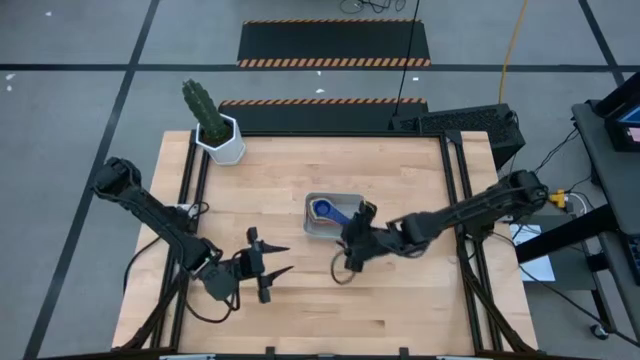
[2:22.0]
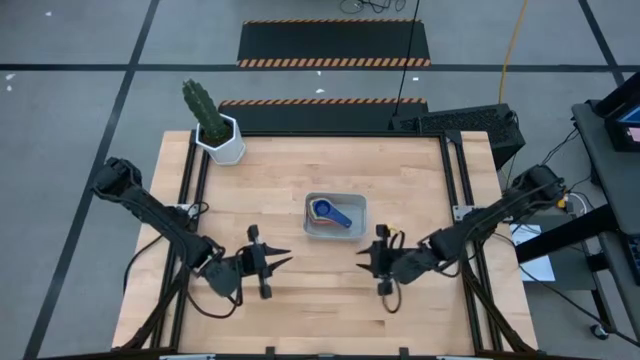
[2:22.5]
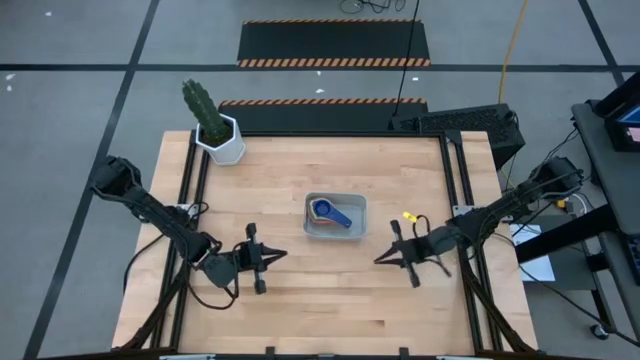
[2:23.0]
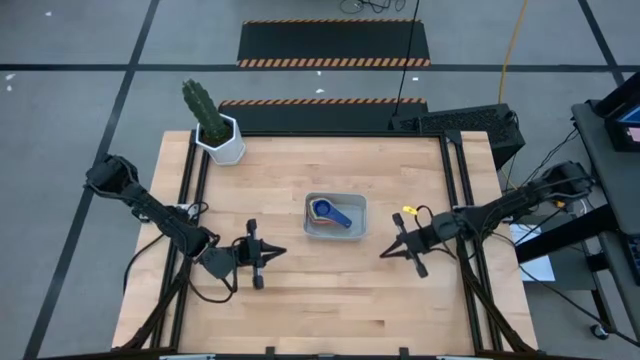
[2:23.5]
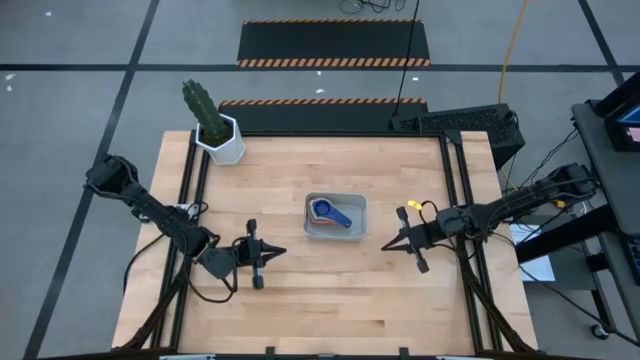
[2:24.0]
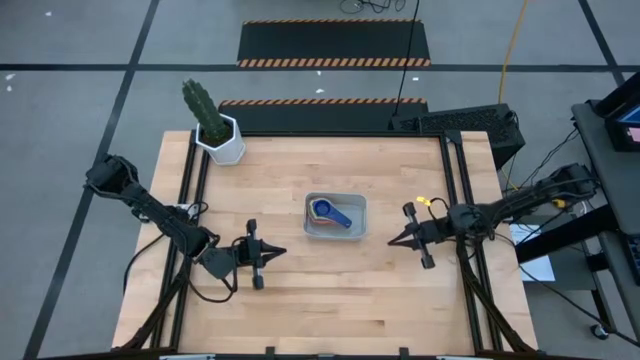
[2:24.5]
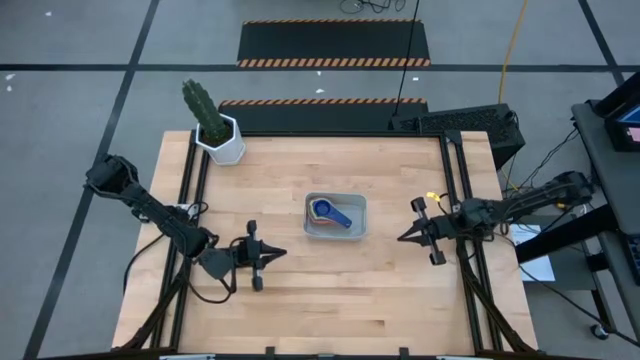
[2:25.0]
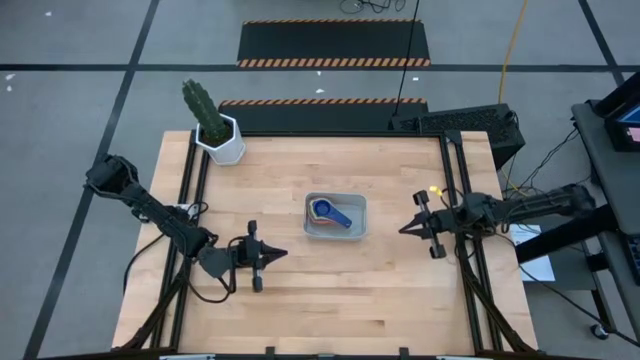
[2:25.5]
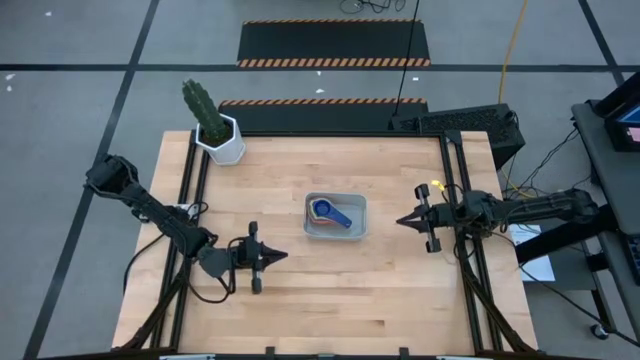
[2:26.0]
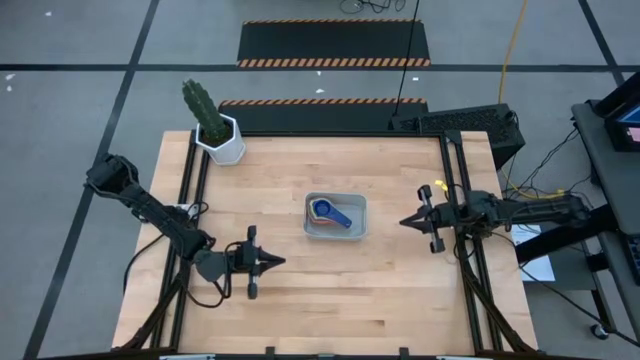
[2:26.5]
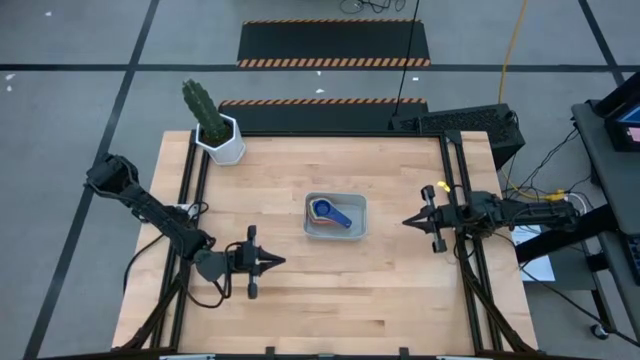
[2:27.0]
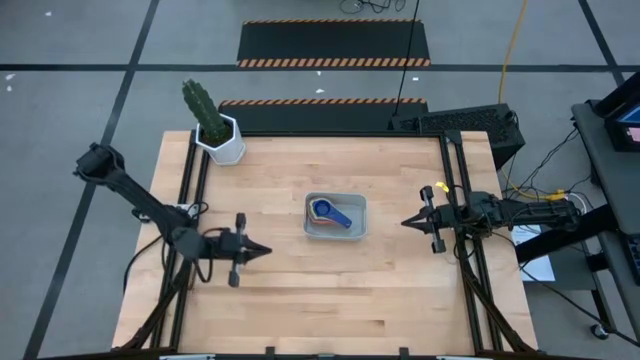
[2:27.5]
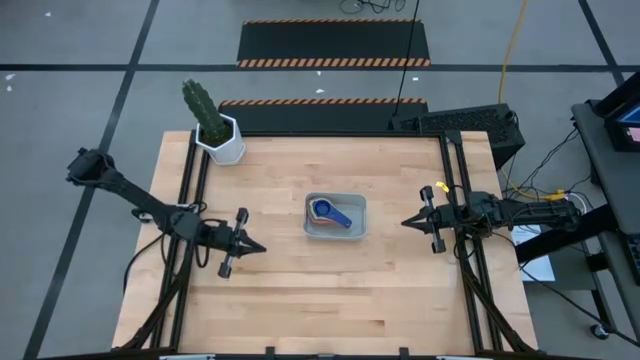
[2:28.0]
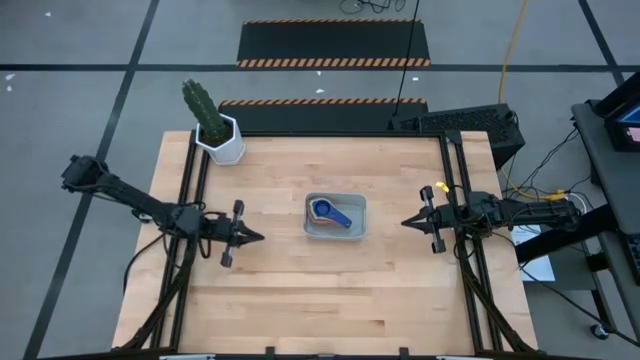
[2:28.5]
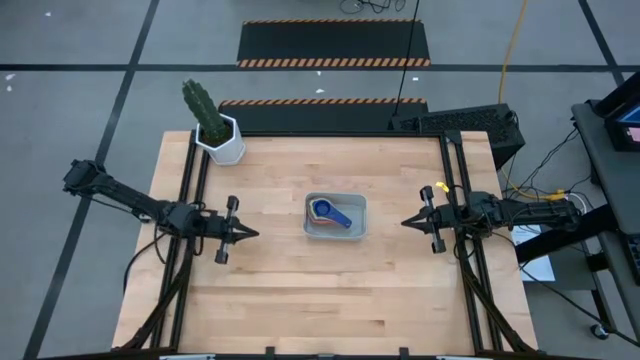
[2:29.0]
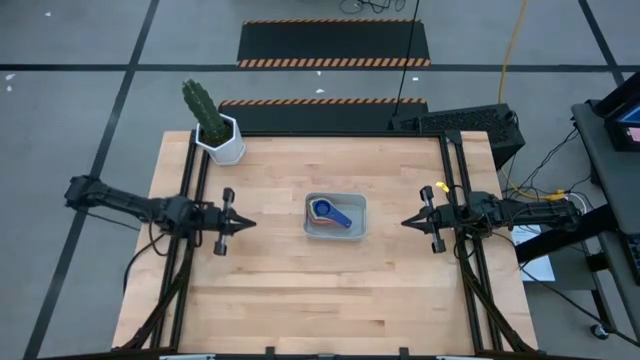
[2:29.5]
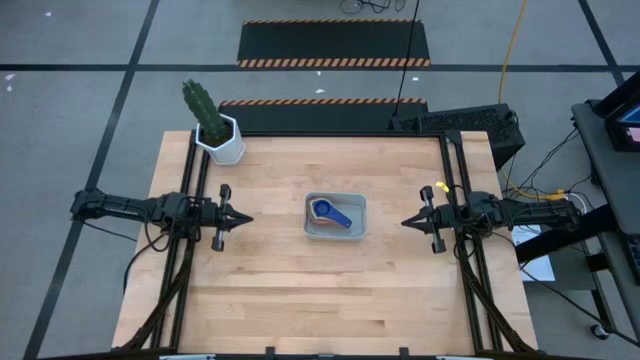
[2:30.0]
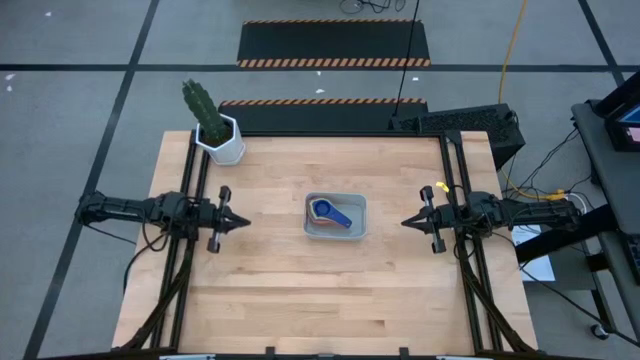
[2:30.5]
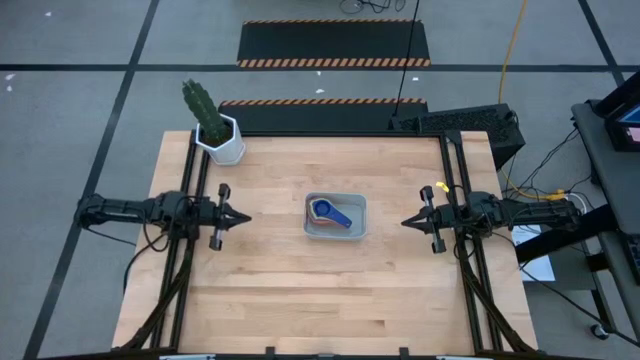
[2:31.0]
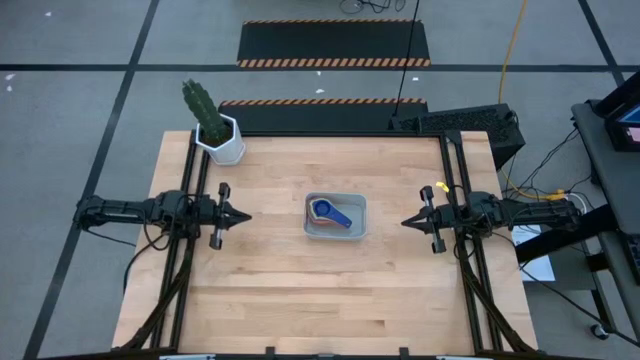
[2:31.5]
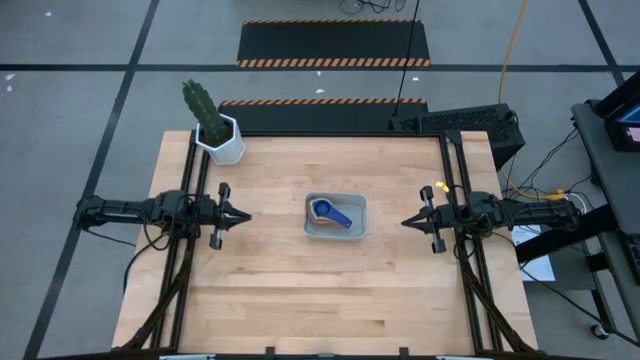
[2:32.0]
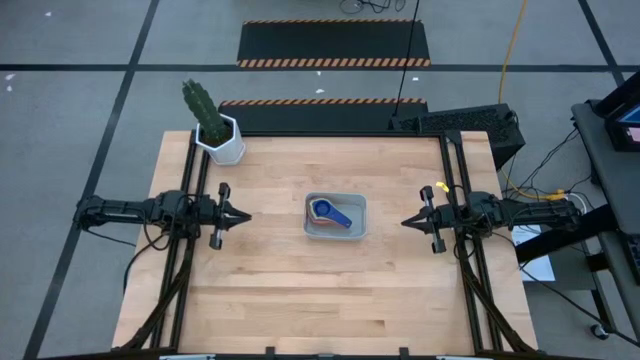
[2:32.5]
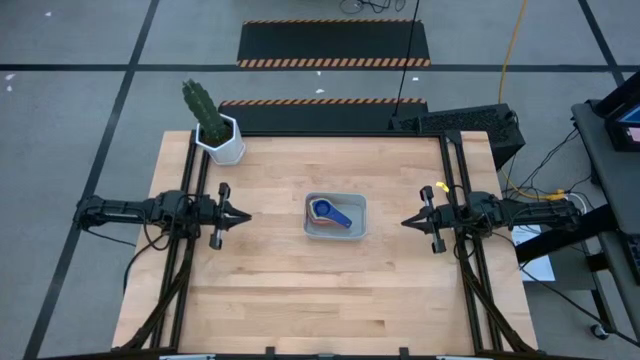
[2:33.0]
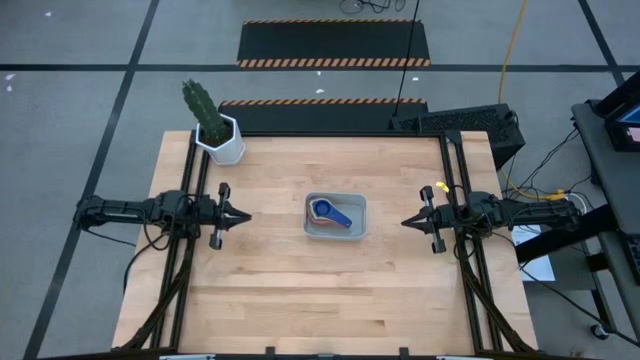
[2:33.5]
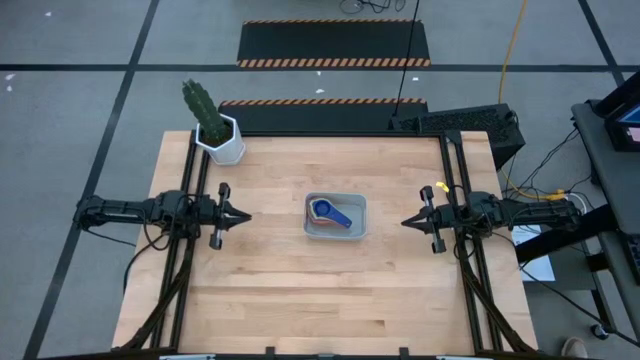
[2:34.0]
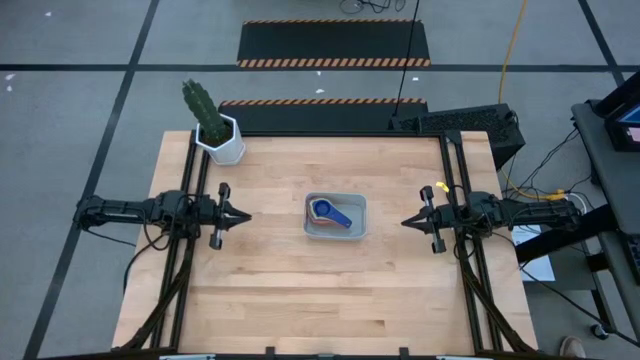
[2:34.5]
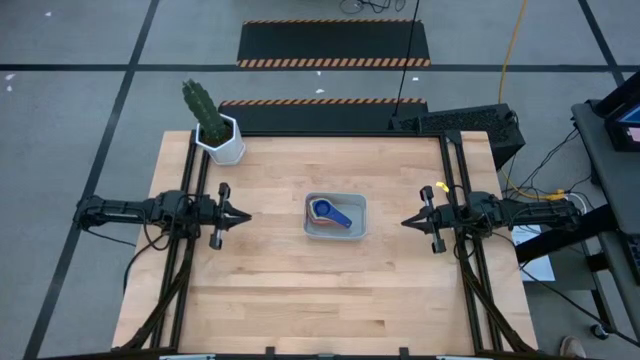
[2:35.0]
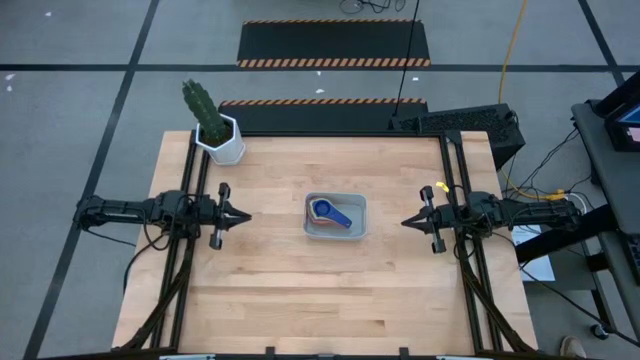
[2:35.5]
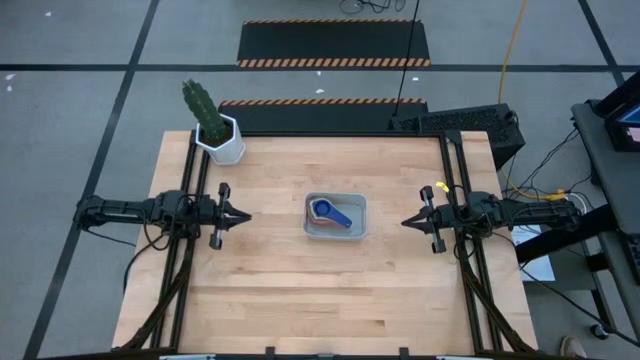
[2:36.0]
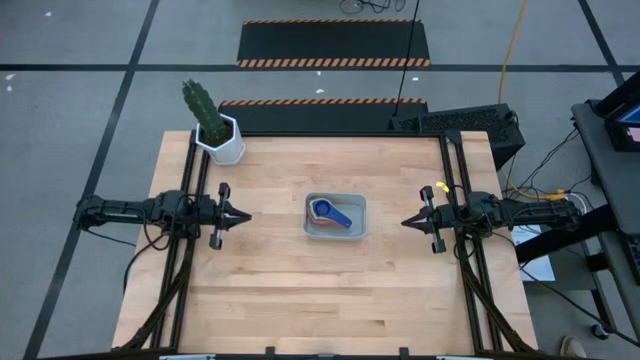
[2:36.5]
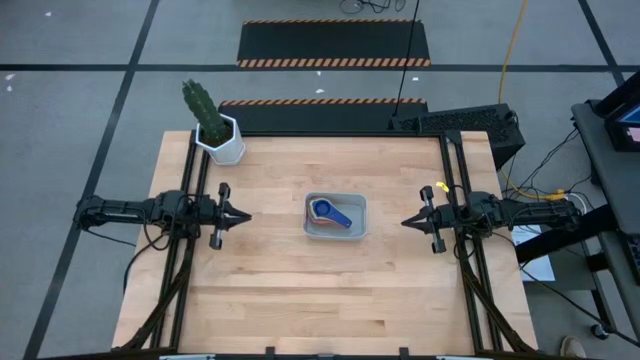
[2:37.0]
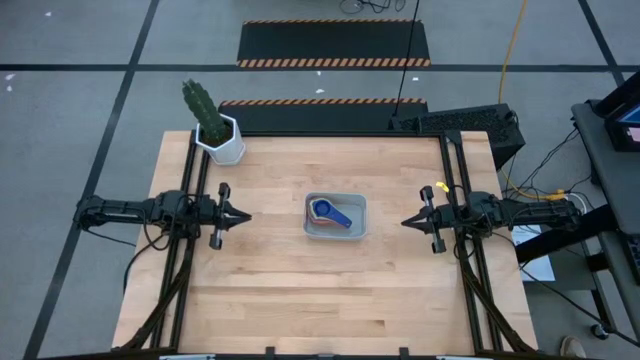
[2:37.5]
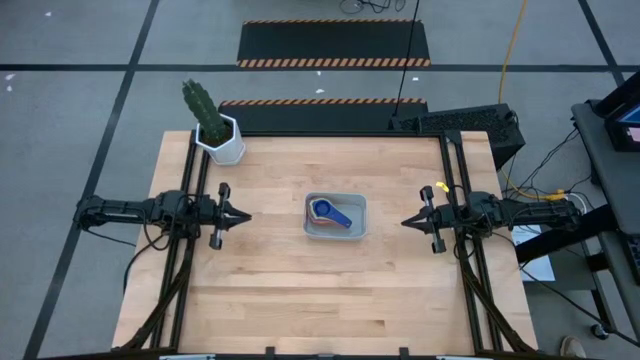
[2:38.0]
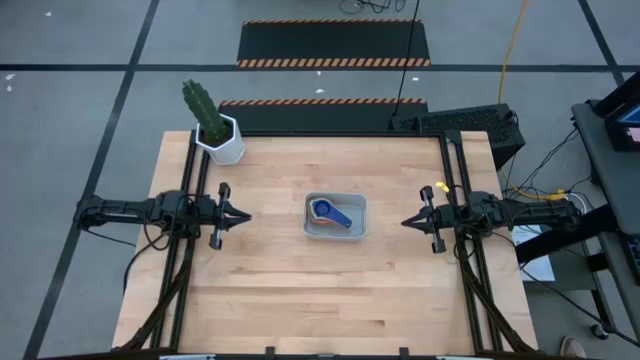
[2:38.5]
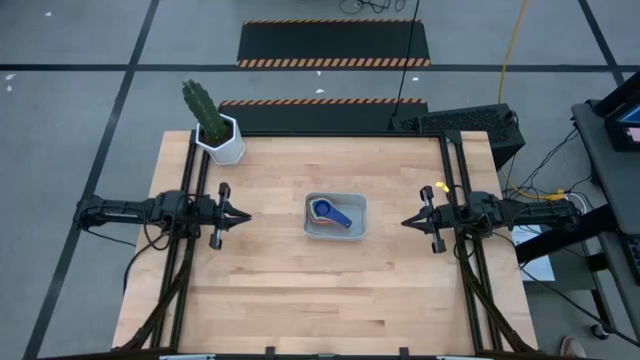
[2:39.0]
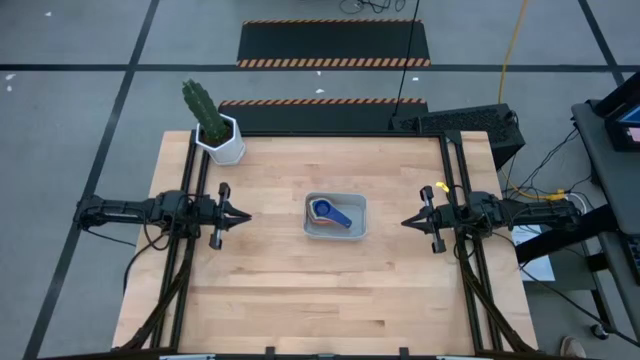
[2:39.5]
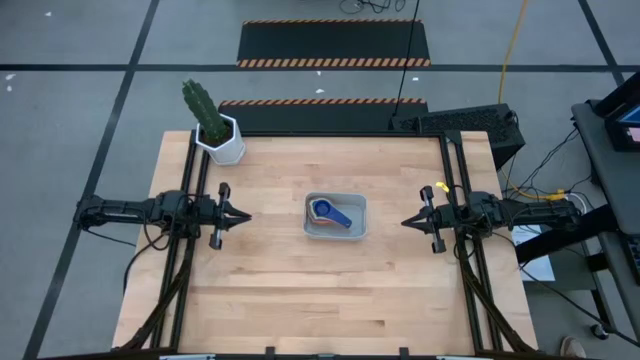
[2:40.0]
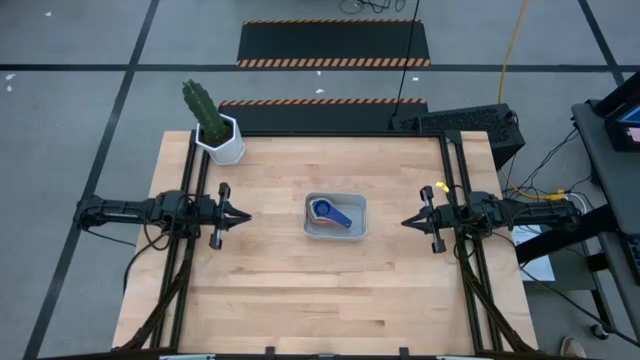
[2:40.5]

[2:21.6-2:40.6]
Task: Nest measuring cups in basket
Return to Home Position

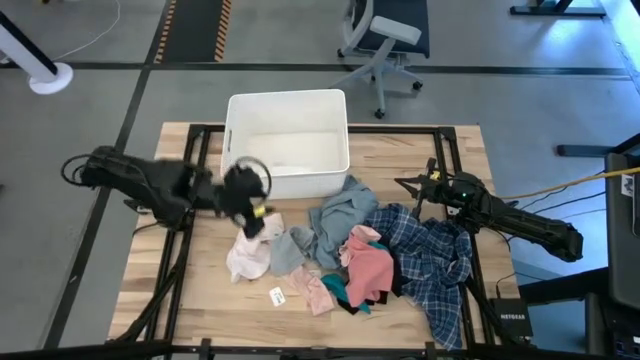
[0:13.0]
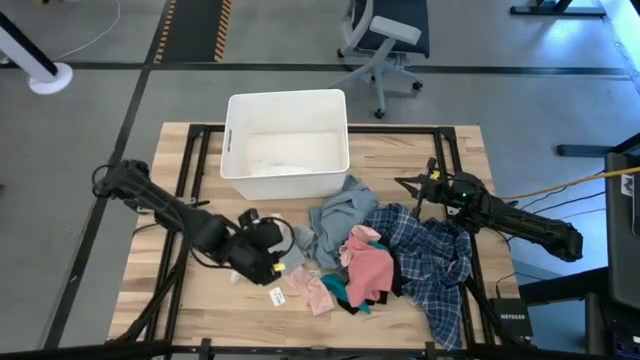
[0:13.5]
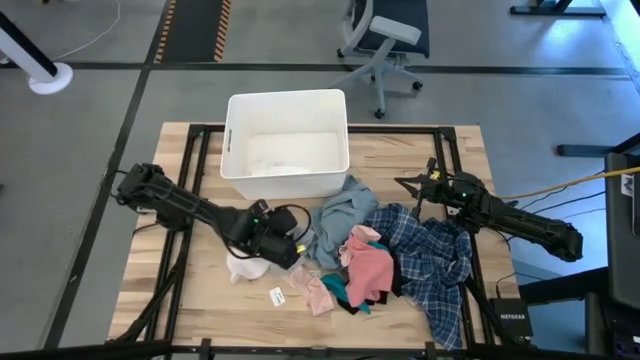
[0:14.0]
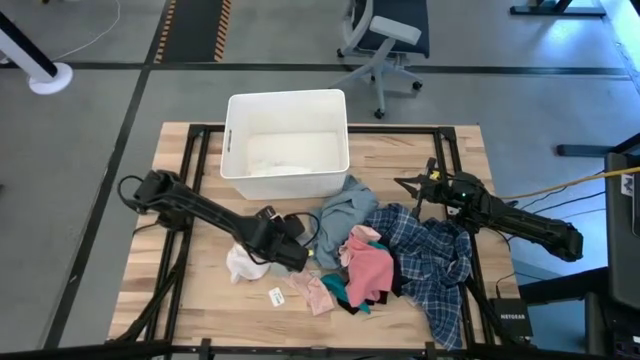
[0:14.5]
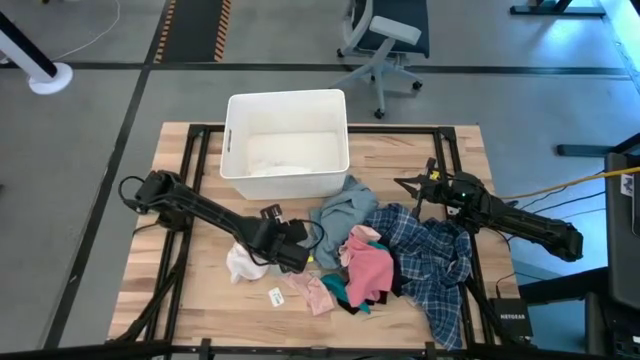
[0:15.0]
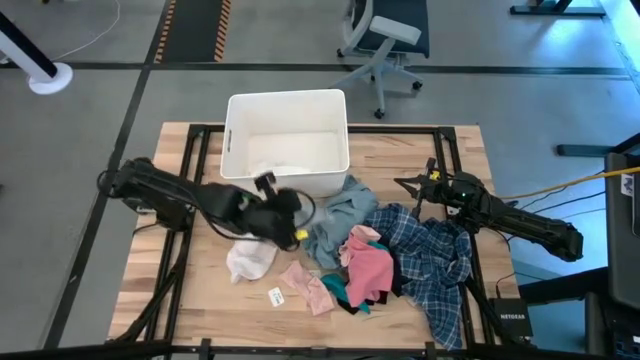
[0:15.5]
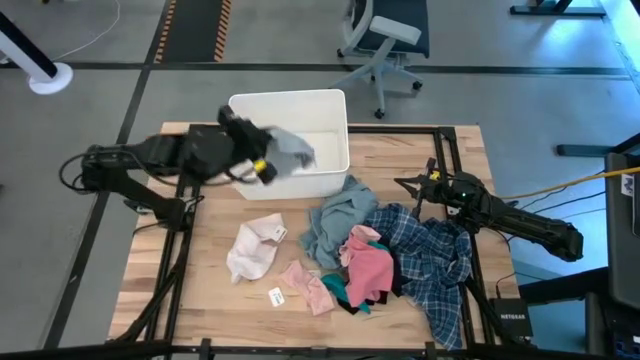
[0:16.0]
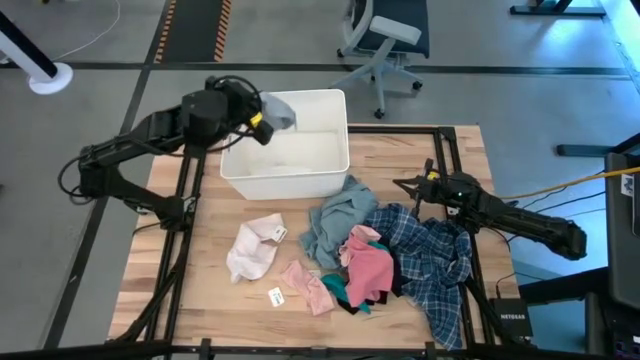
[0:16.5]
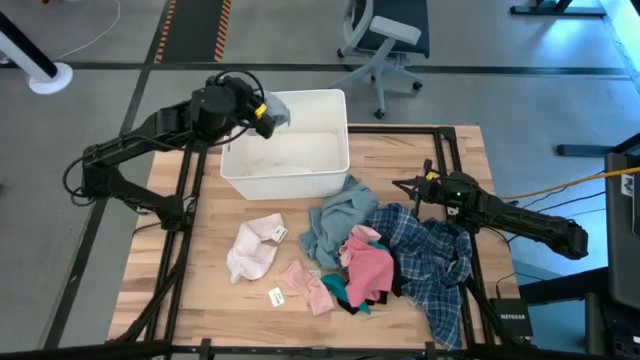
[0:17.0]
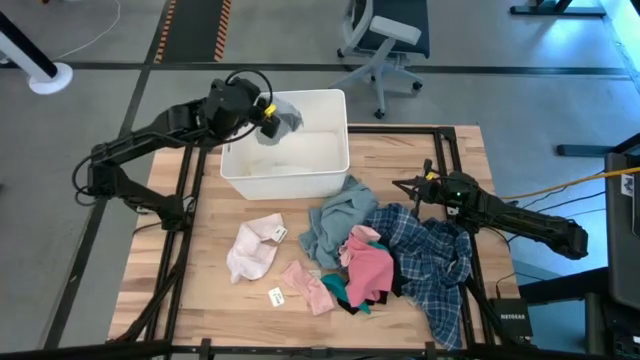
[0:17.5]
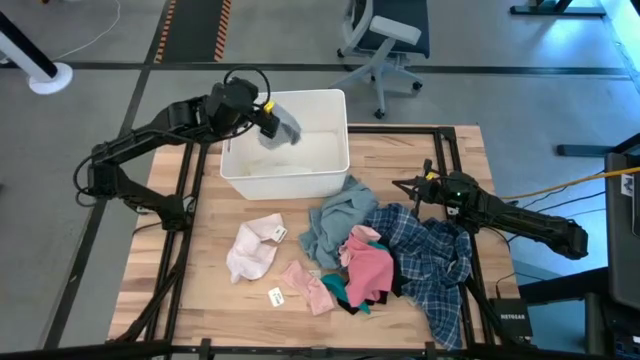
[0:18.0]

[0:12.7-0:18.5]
Task: Sort clothes
Put the gray underwear into the white bin
